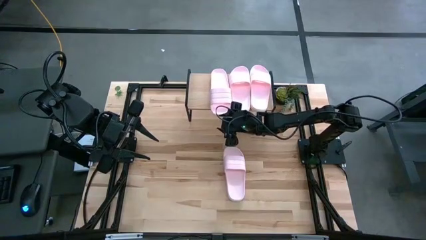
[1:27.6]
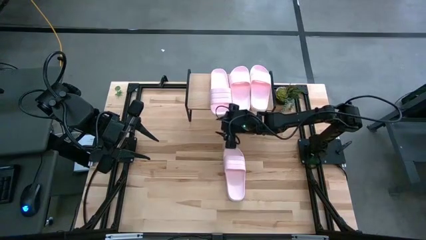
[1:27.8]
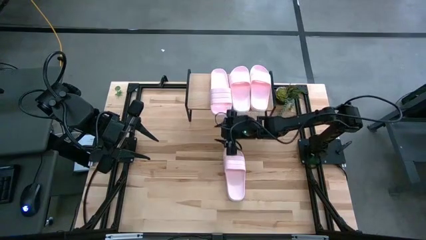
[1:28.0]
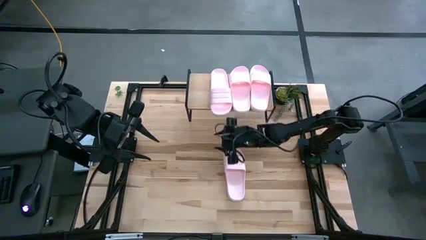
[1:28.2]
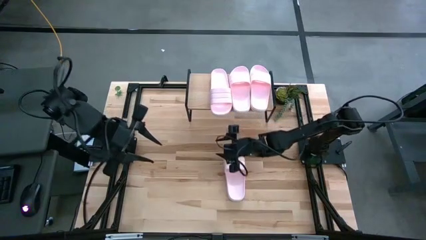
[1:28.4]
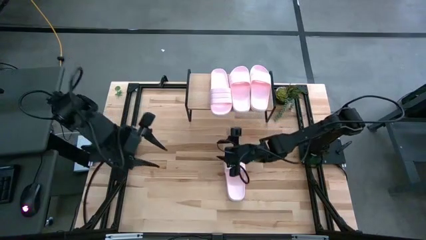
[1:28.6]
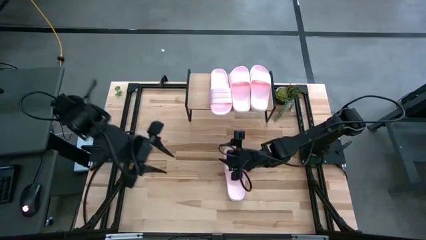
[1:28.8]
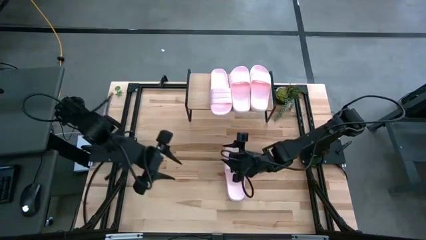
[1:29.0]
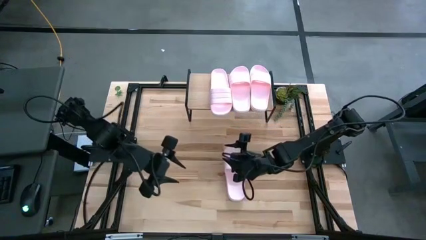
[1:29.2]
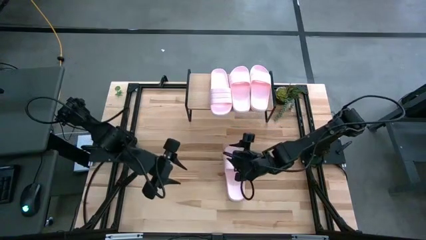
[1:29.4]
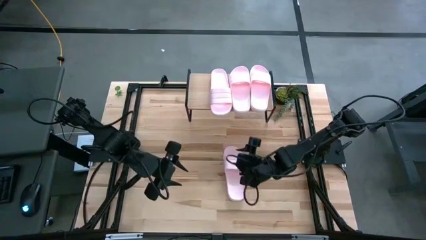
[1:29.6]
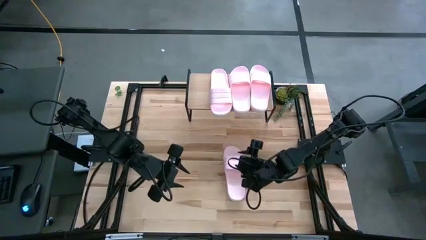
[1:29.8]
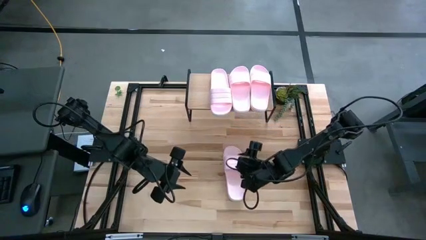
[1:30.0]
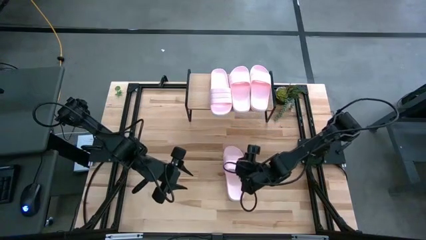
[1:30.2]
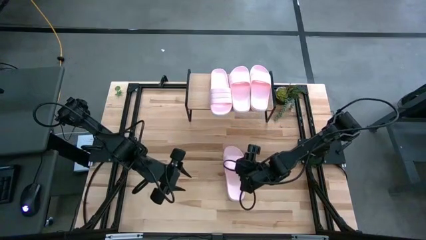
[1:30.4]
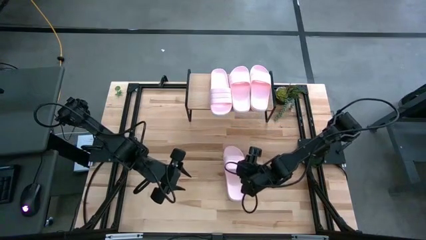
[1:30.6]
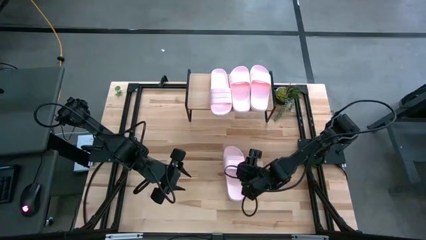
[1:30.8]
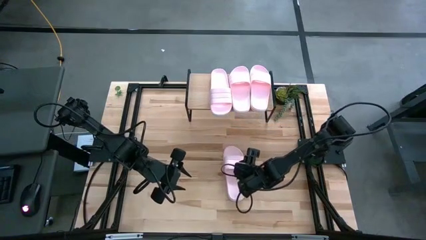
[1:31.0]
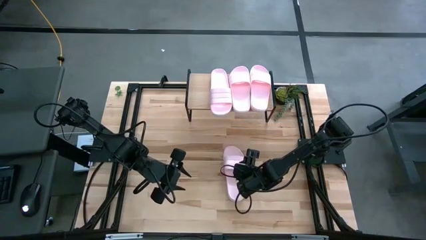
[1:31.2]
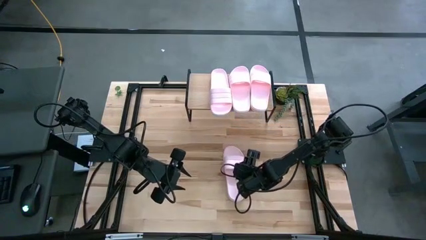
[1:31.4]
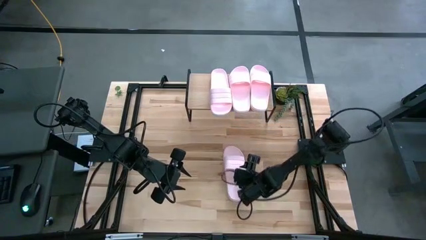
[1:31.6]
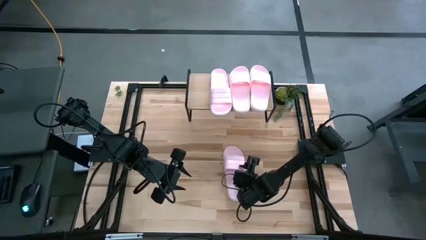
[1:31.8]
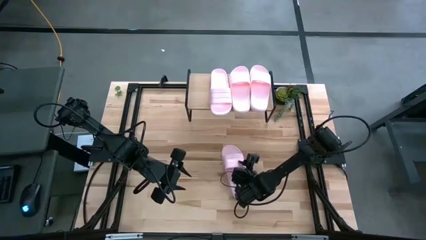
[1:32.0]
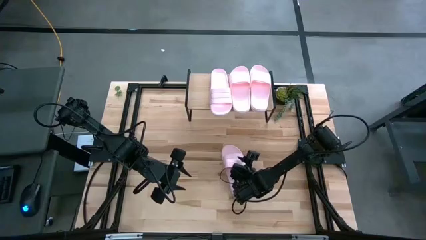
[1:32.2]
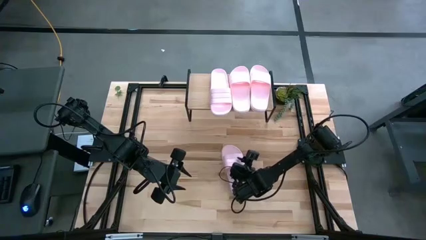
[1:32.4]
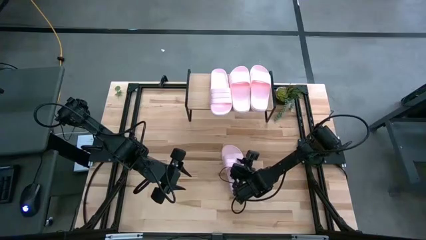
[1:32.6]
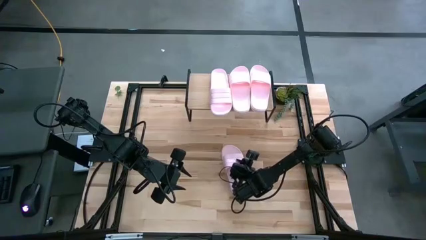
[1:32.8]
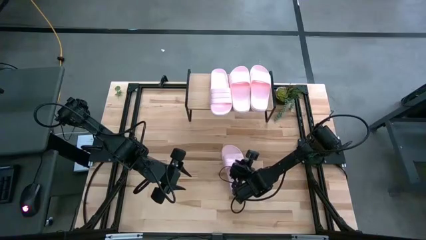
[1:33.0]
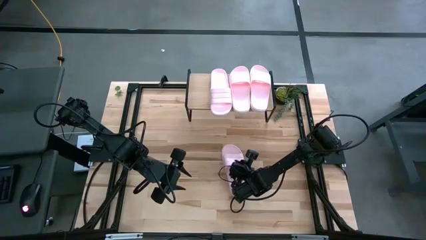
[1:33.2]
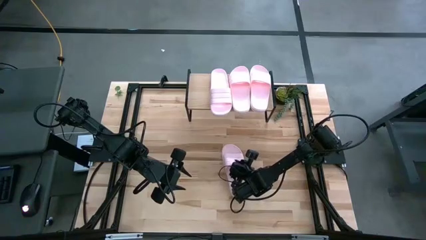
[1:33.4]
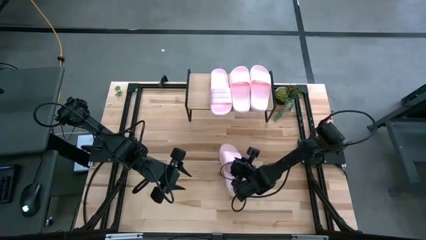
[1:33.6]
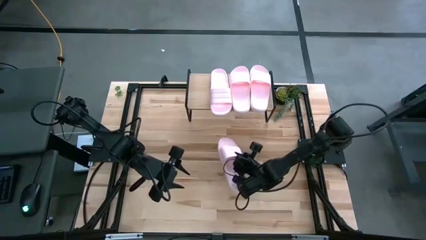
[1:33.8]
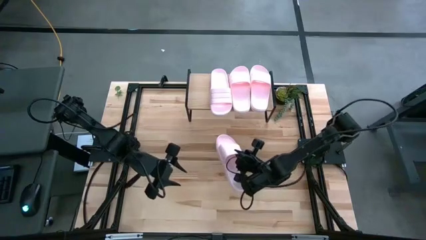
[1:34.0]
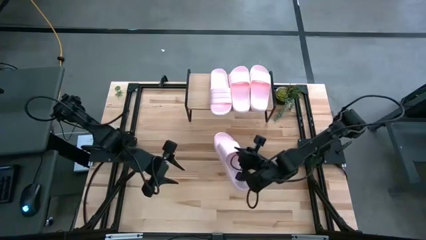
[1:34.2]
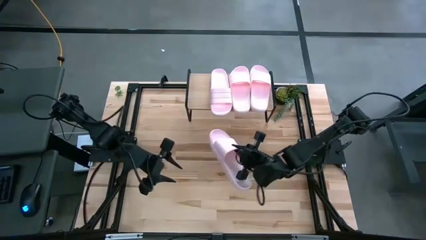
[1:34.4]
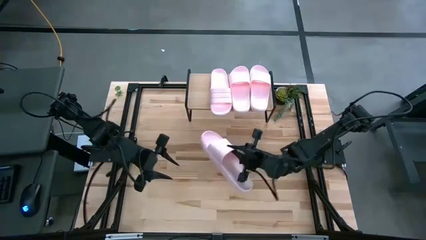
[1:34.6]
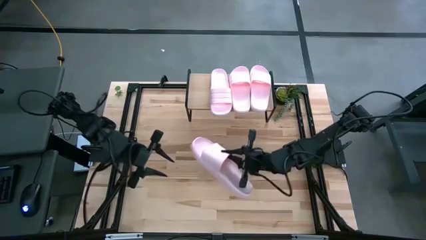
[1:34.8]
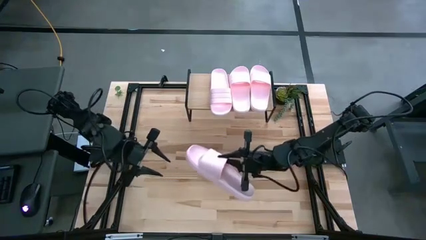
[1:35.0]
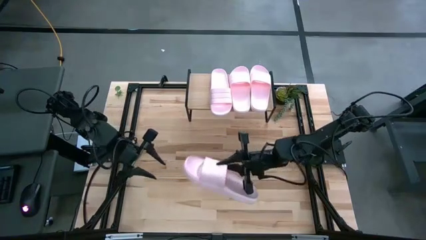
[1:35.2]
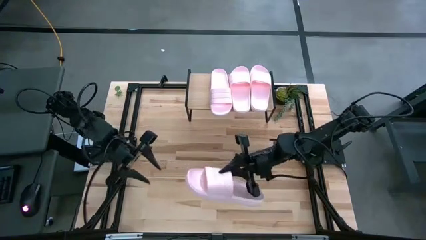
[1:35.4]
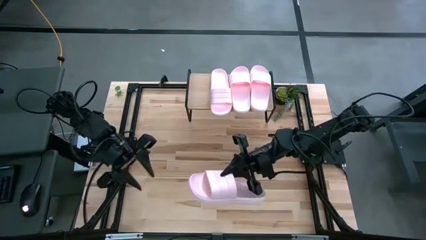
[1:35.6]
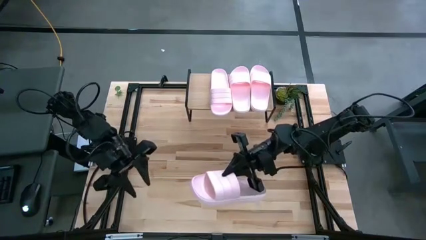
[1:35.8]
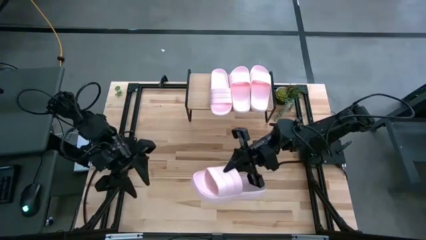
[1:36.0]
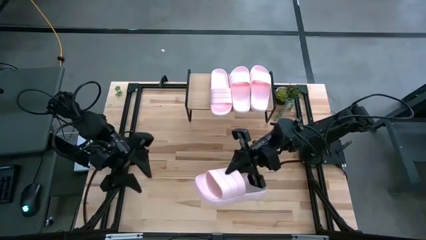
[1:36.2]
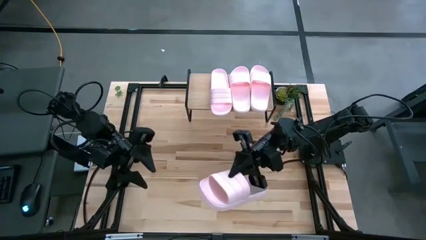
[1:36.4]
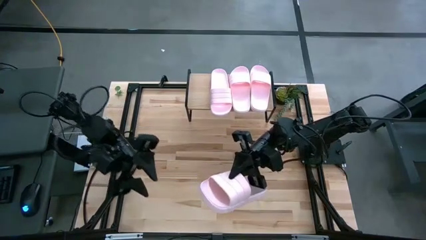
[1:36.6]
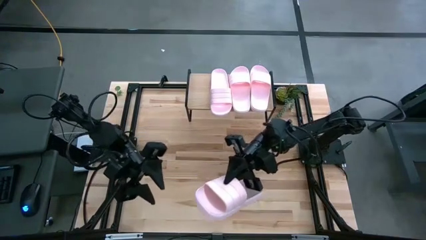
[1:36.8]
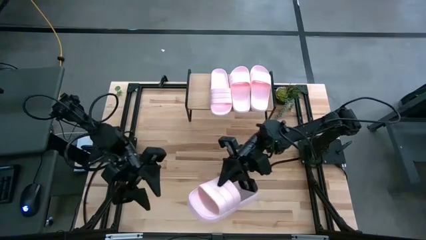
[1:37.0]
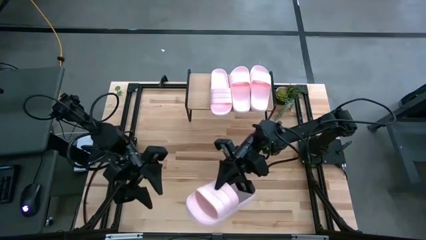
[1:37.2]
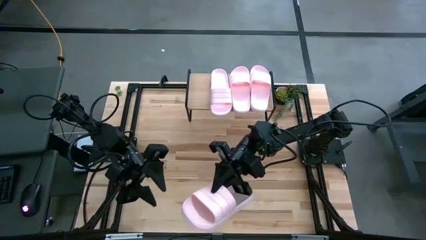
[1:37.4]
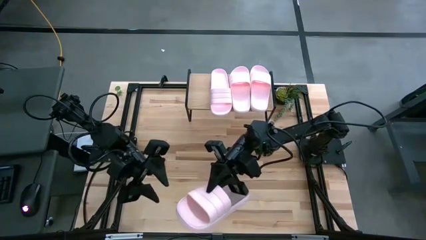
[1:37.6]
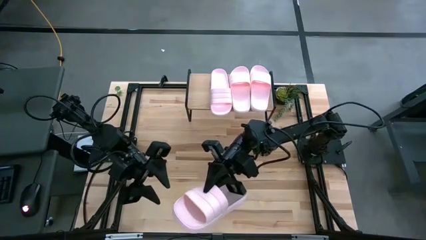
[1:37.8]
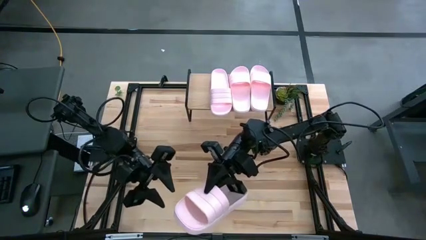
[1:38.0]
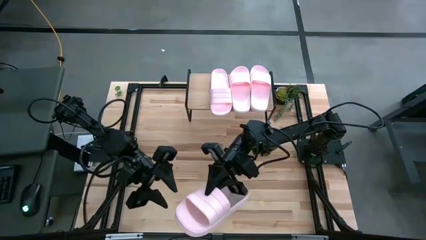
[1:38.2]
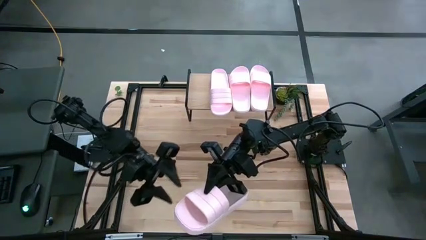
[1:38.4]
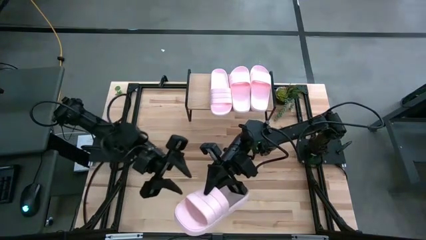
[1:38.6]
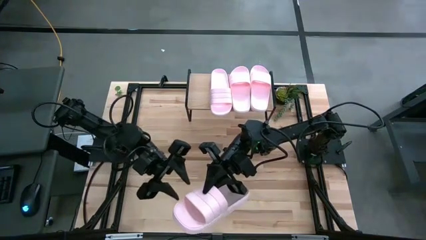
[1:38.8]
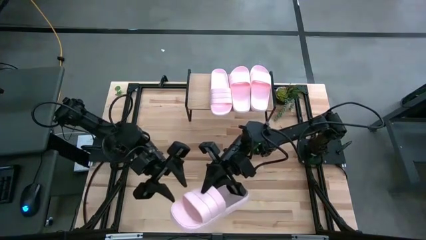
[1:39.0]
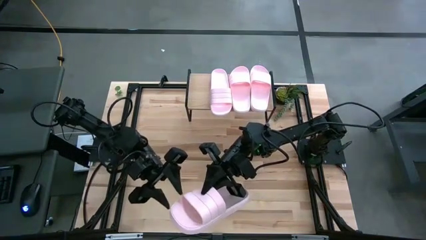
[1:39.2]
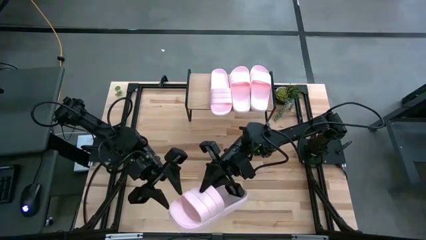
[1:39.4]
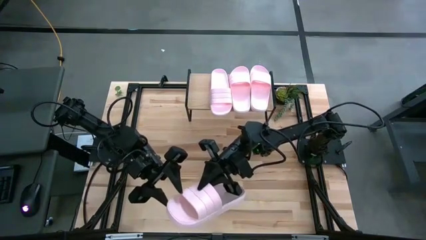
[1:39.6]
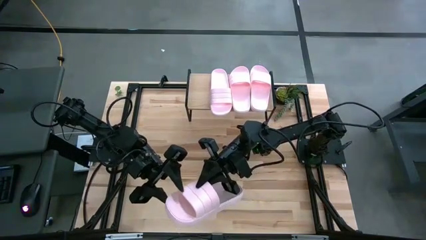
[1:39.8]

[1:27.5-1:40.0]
Task: Pick and place slides into the shelf
Put the pink slide on the shelf

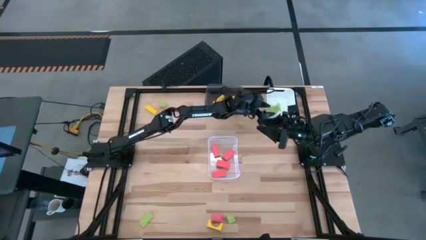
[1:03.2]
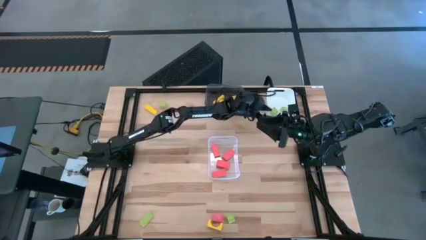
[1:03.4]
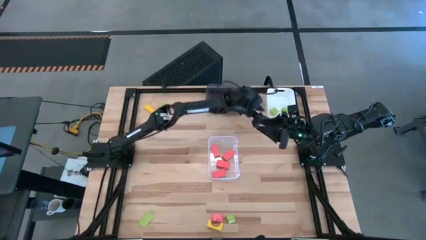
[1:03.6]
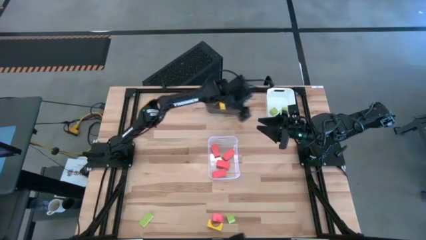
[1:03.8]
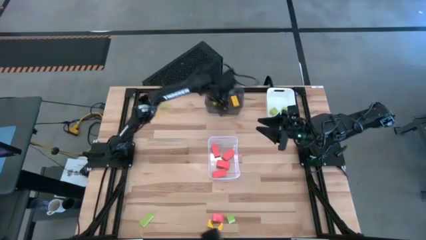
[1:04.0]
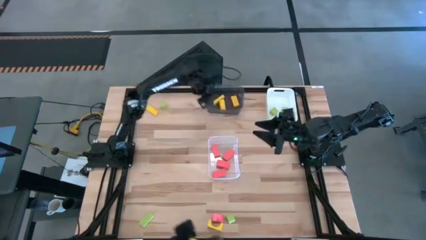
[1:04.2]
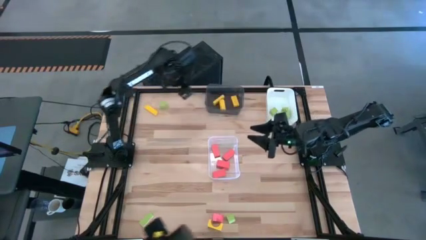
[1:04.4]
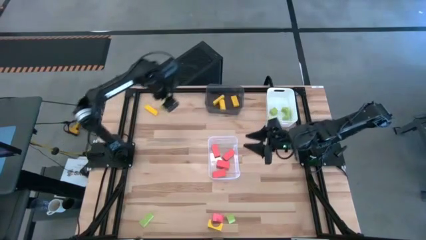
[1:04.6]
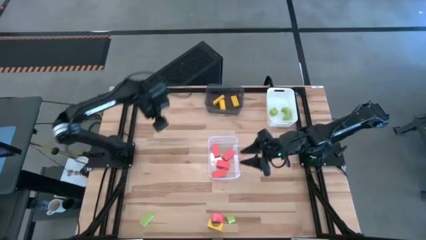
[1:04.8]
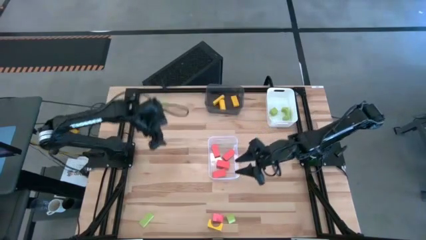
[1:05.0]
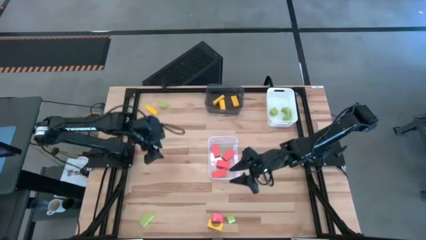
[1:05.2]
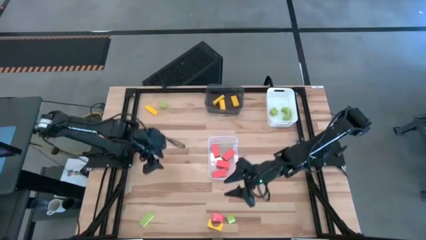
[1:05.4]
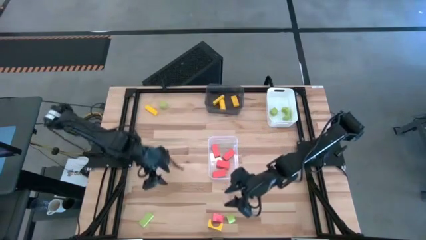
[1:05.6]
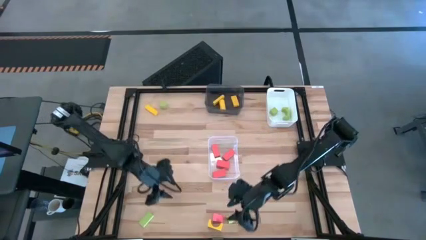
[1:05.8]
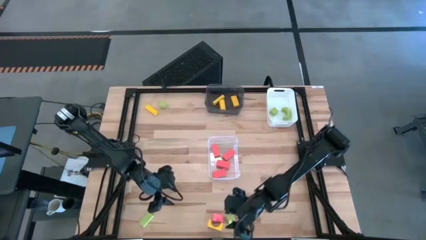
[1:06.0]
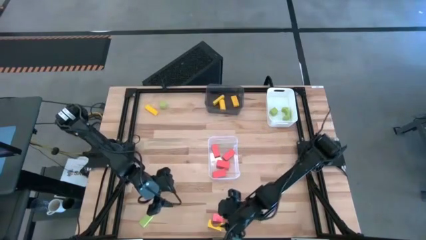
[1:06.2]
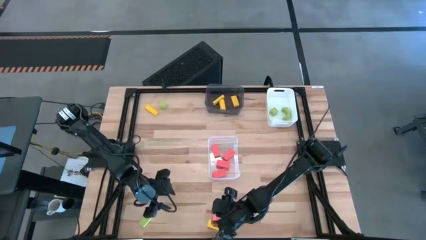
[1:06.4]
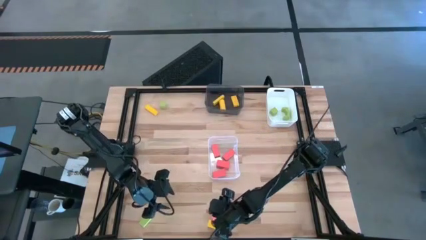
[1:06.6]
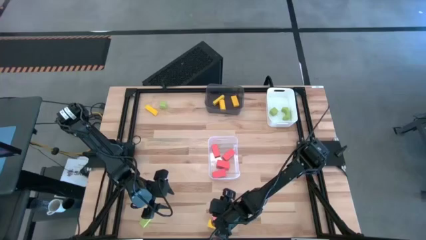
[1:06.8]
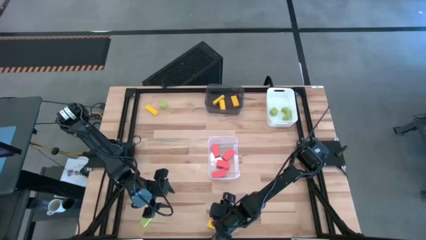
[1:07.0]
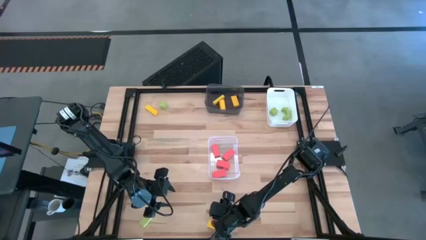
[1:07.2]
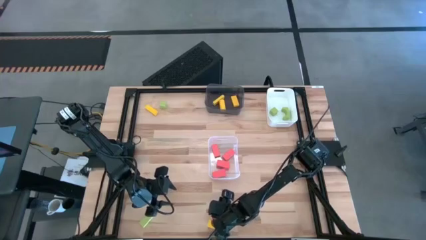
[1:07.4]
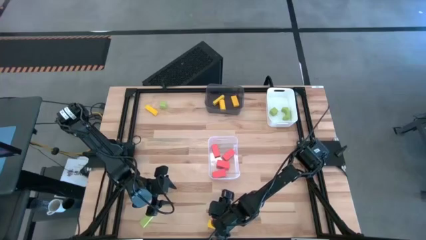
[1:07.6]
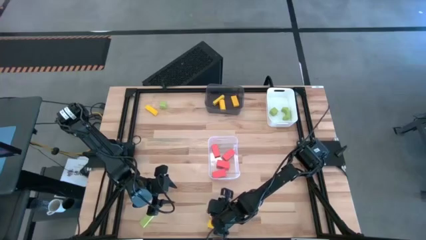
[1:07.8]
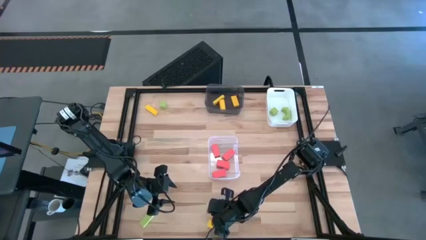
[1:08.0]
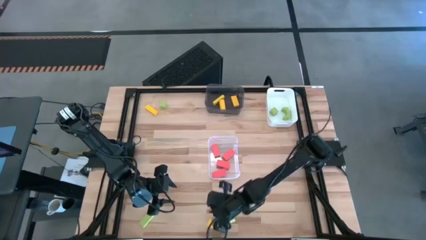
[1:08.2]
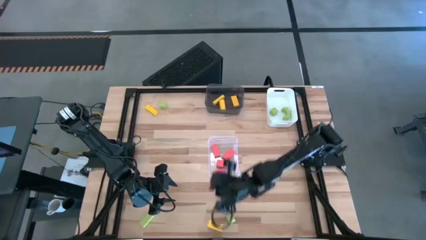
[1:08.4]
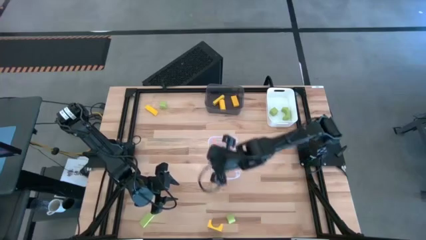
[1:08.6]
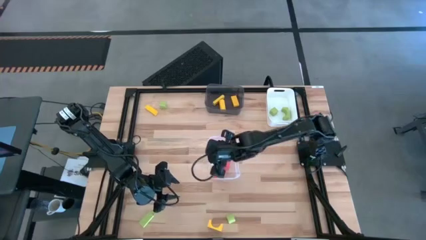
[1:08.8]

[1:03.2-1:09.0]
Task: Sort & place blocks by color
Put the pink block into the transparent bin
